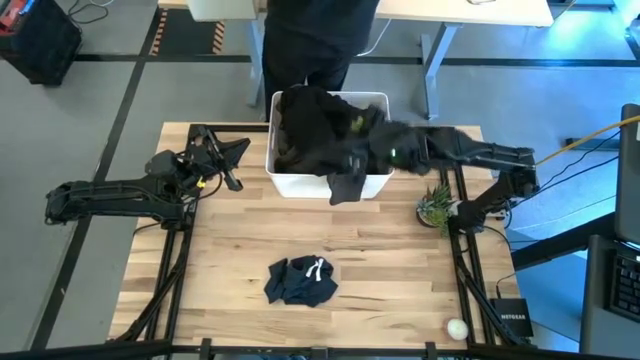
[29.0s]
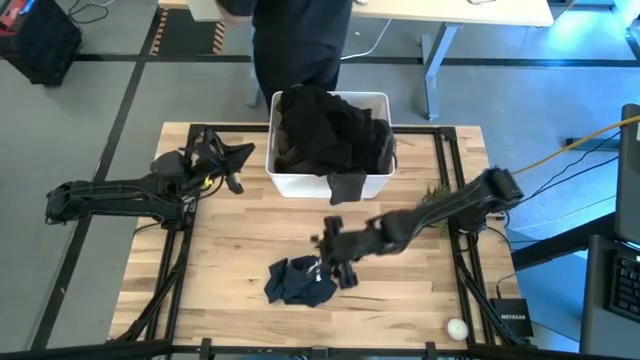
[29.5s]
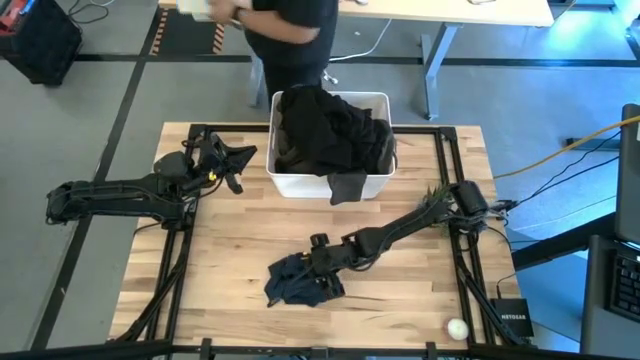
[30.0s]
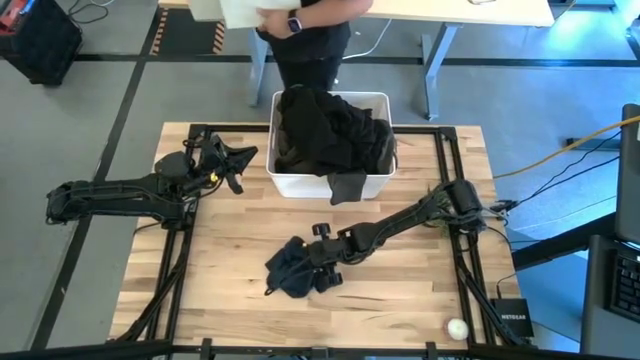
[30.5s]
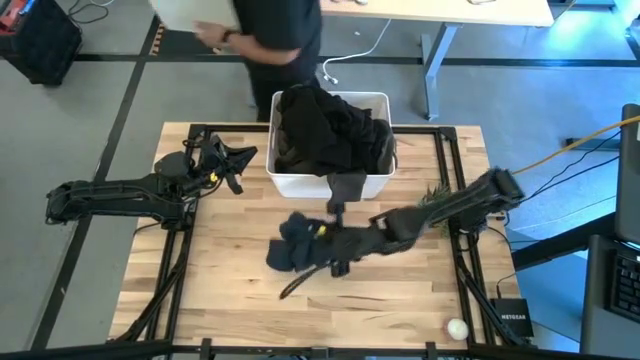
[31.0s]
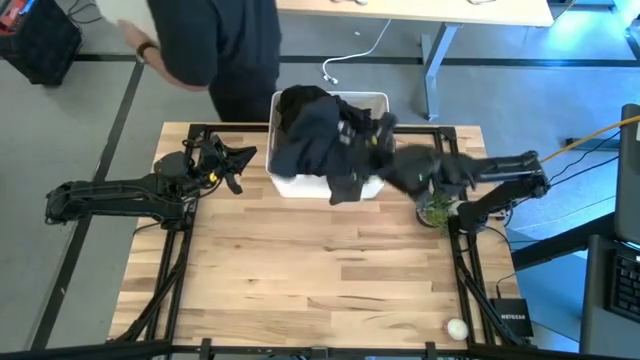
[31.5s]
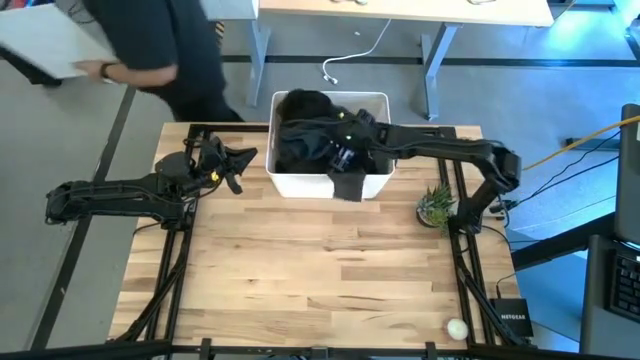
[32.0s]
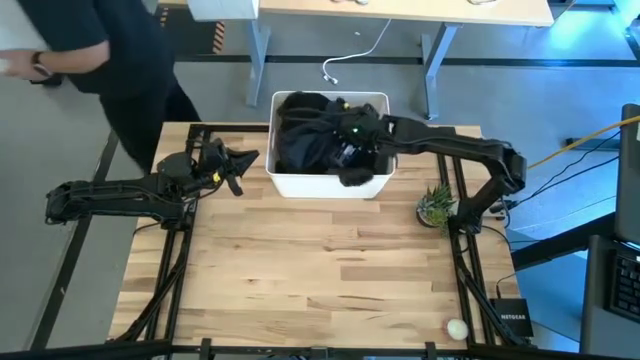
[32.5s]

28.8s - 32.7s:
Task: Sort clothes
Put the dark blue shorts into the bin

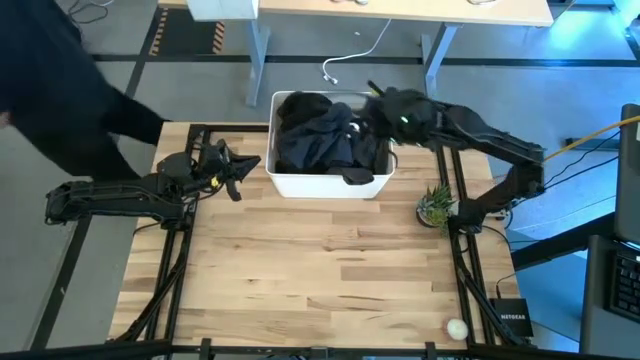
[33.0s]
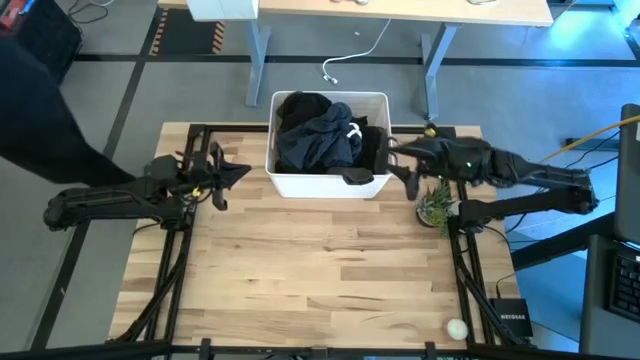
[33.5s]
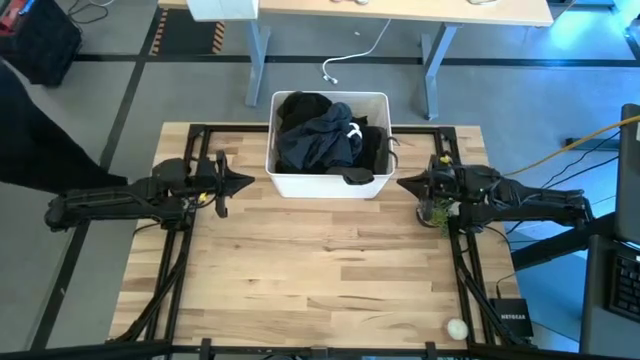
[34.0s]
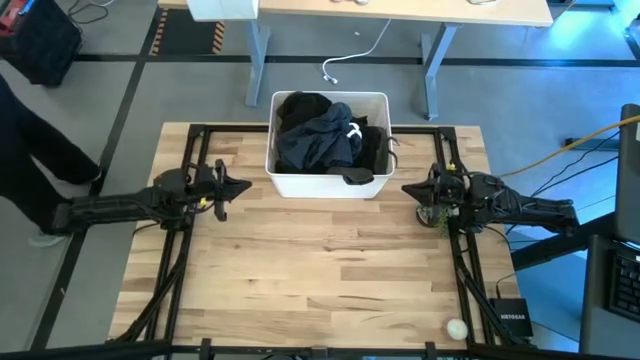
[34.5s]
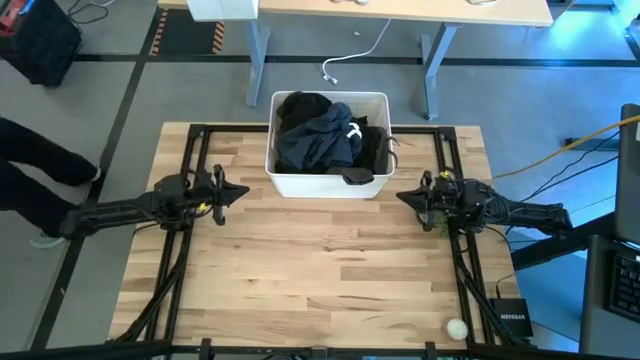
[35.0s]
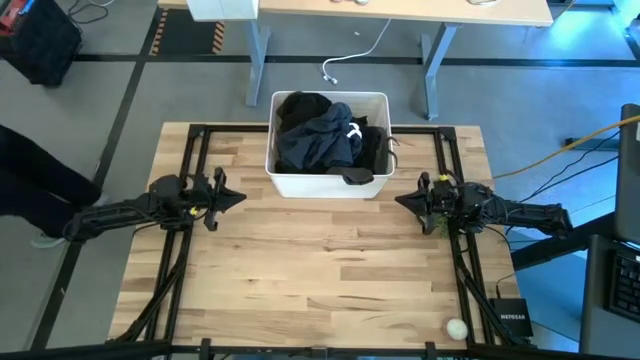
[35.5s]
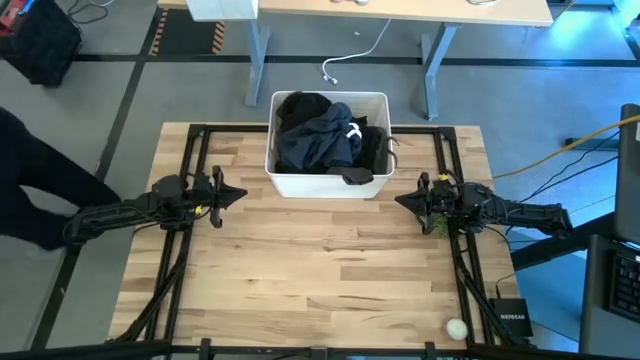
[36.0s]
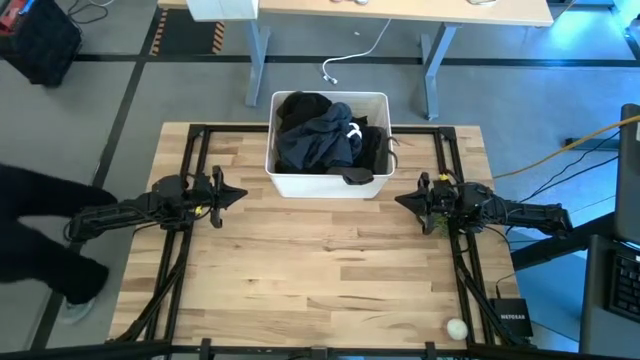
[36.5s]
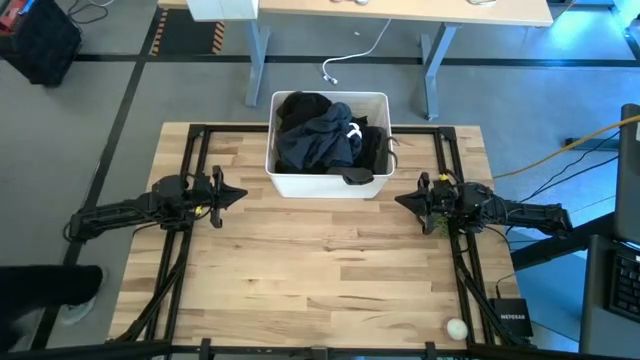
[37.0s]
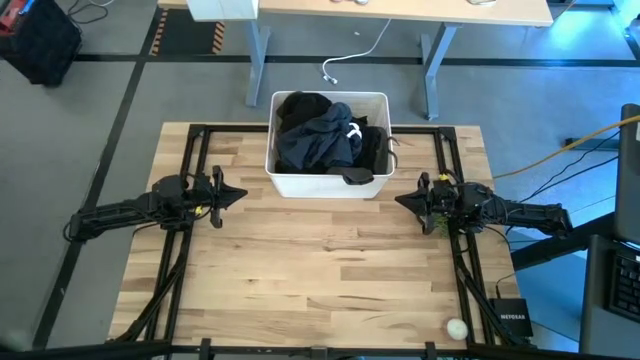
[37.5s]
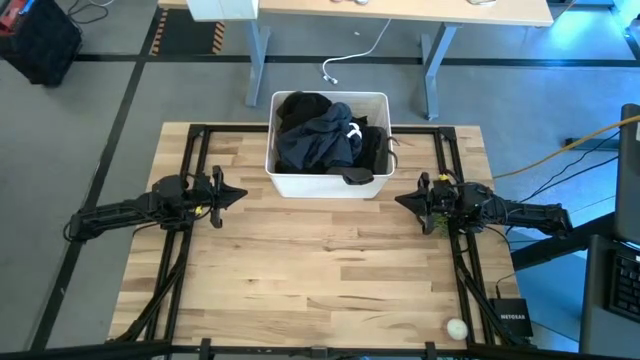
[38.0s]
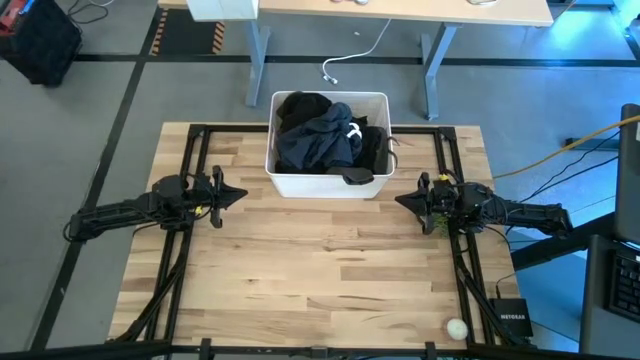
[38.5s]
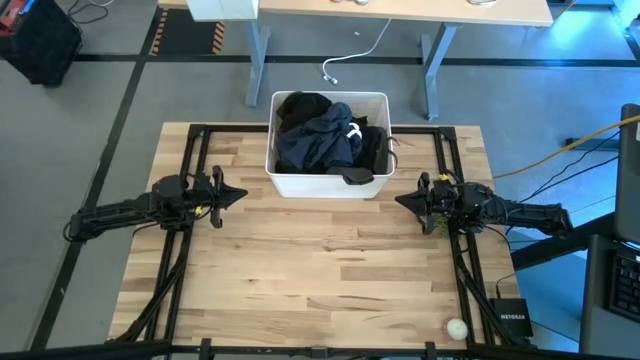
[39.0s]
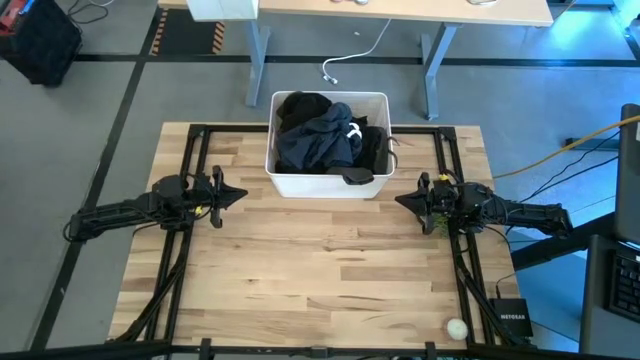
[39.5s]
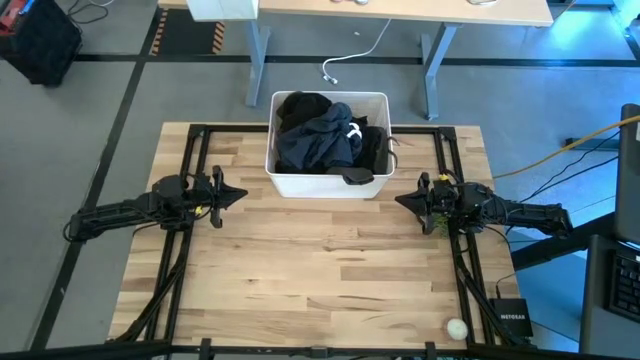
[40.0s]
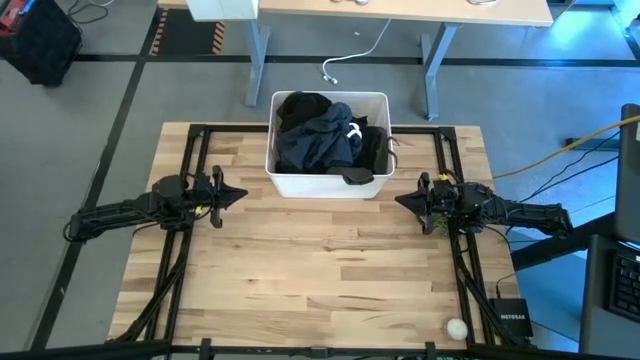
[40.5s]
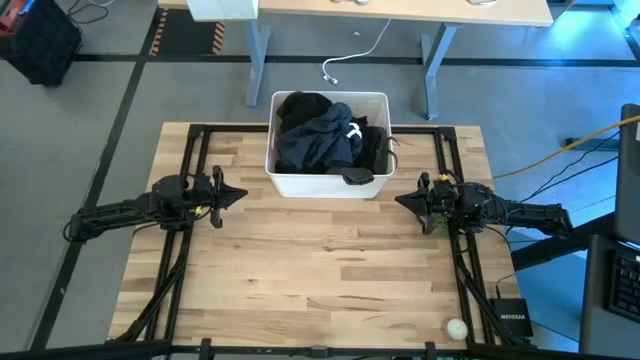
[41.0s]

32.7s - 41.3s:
Return to Home Position

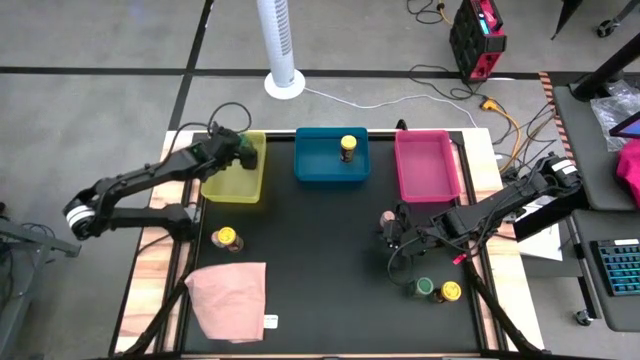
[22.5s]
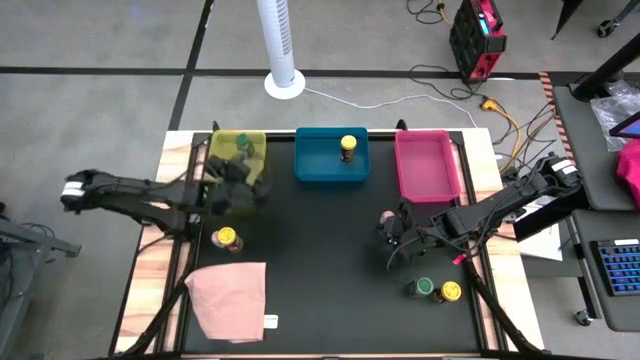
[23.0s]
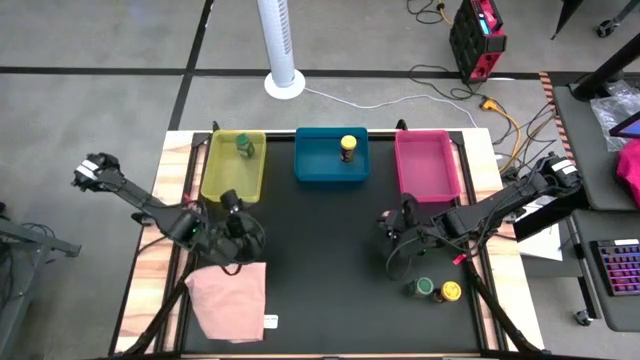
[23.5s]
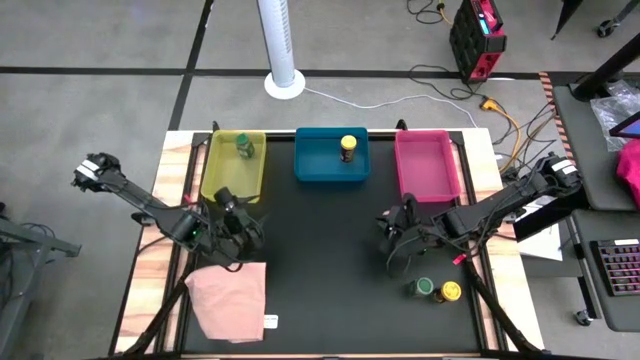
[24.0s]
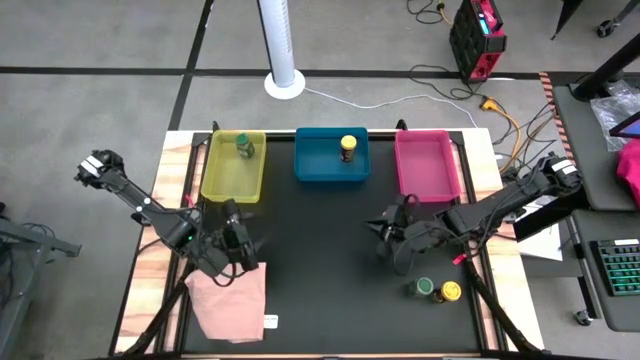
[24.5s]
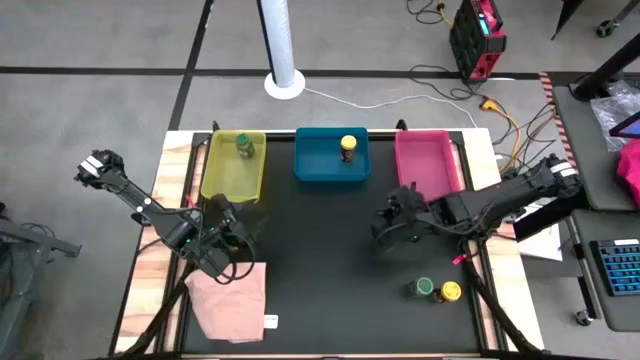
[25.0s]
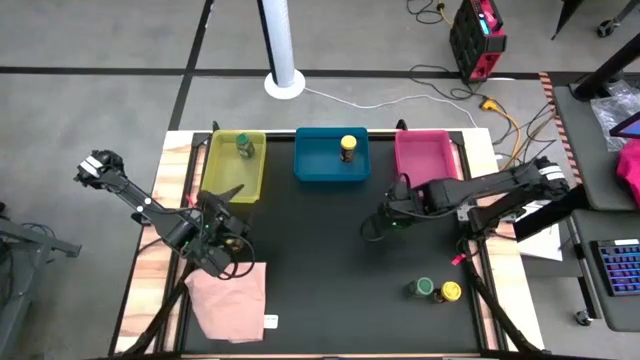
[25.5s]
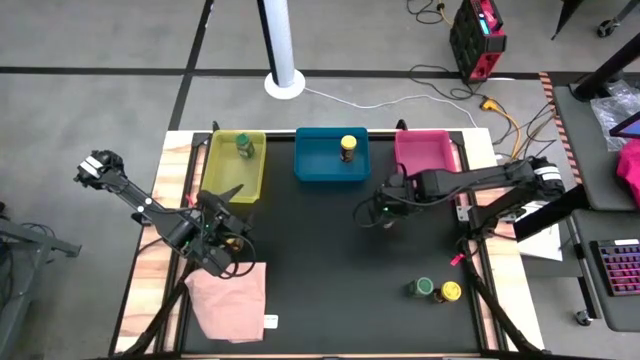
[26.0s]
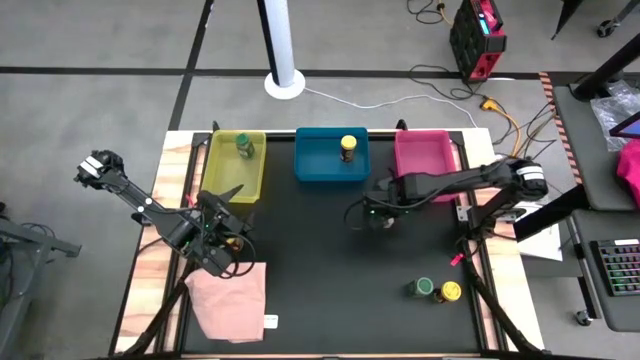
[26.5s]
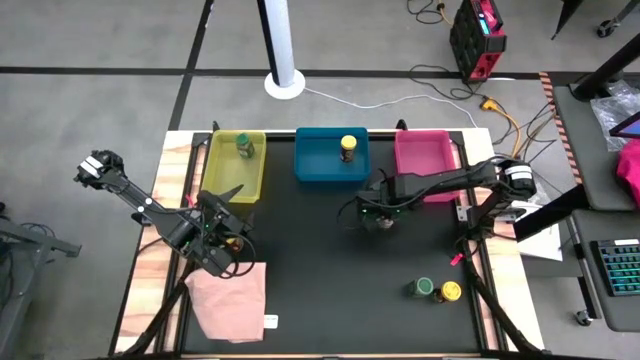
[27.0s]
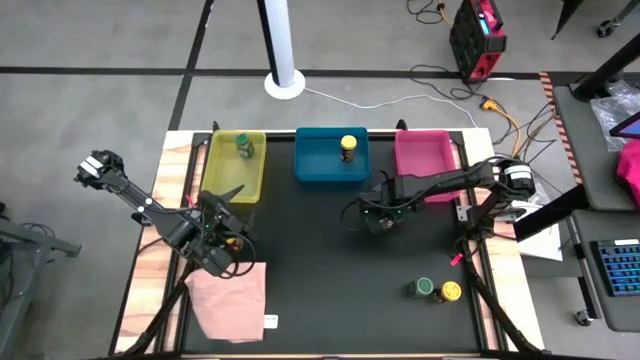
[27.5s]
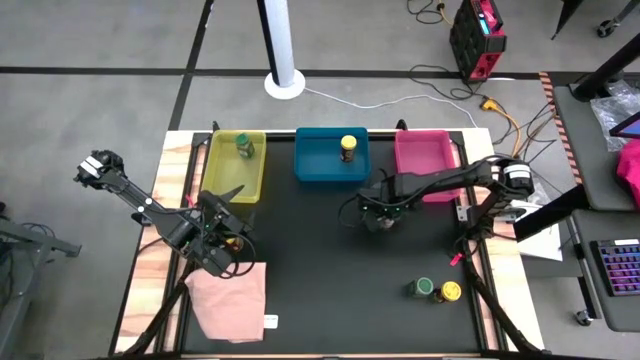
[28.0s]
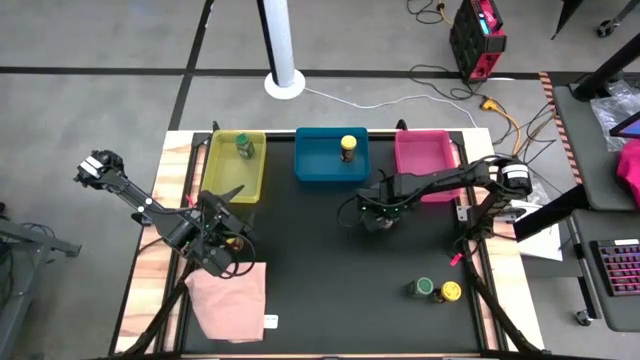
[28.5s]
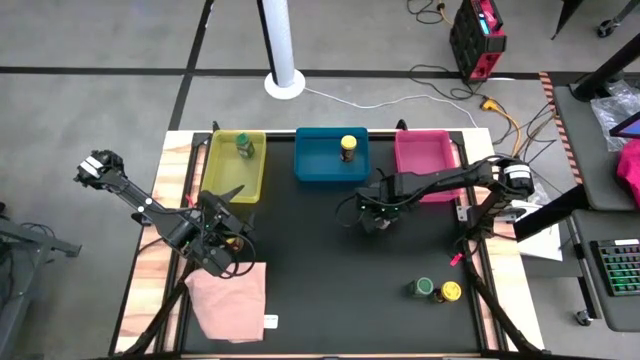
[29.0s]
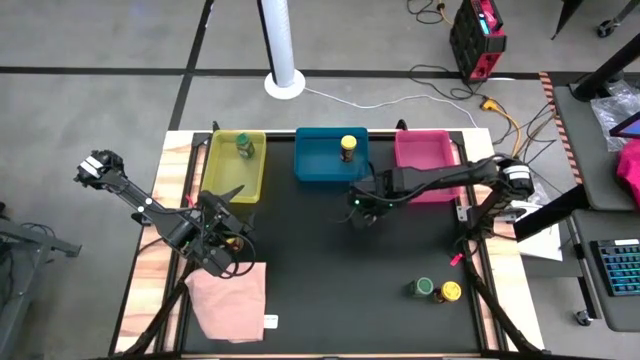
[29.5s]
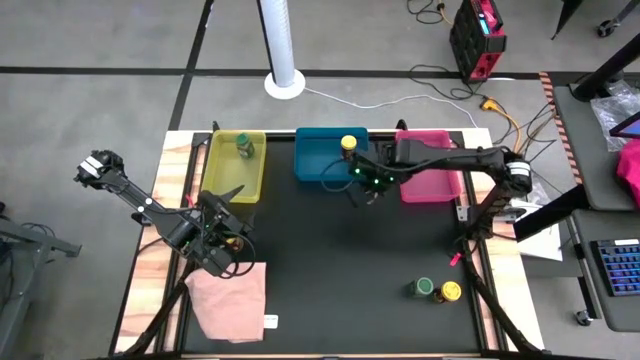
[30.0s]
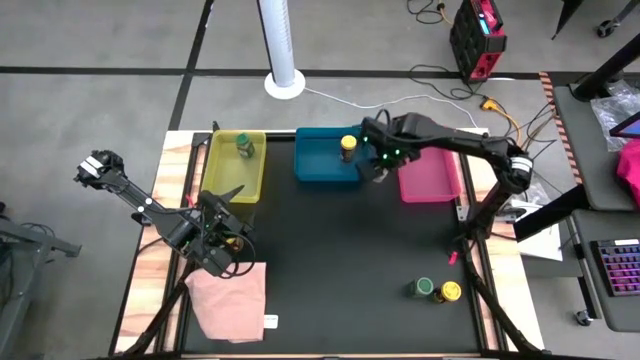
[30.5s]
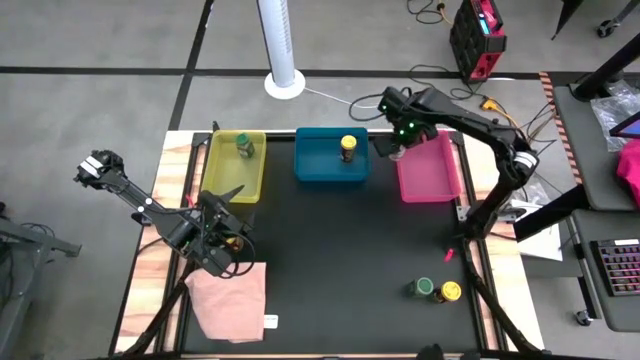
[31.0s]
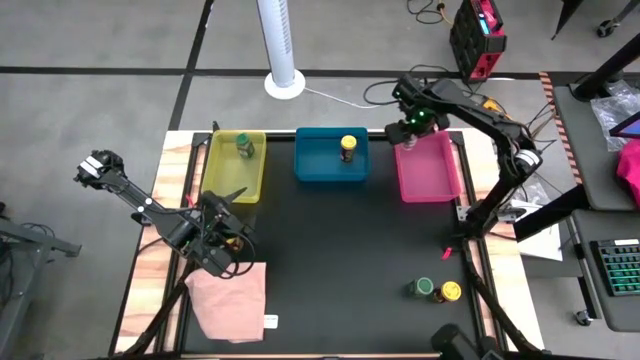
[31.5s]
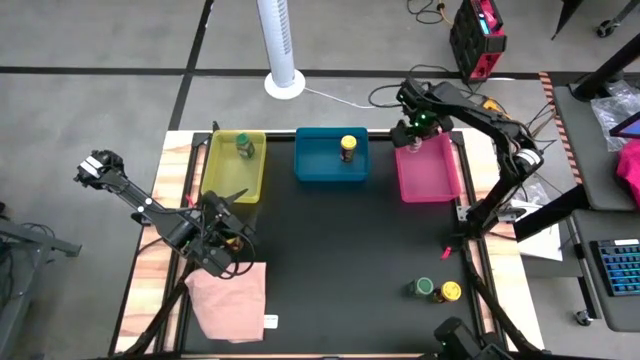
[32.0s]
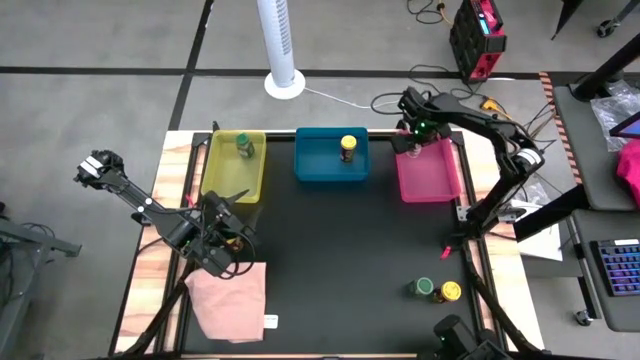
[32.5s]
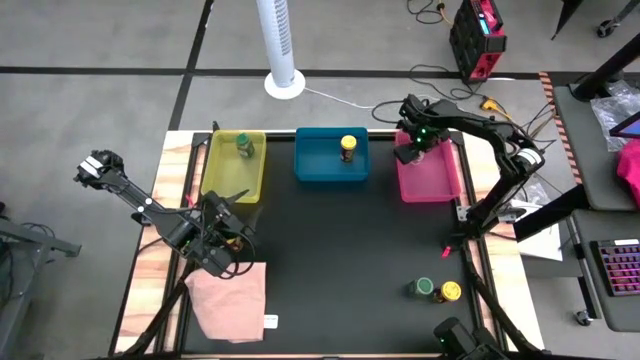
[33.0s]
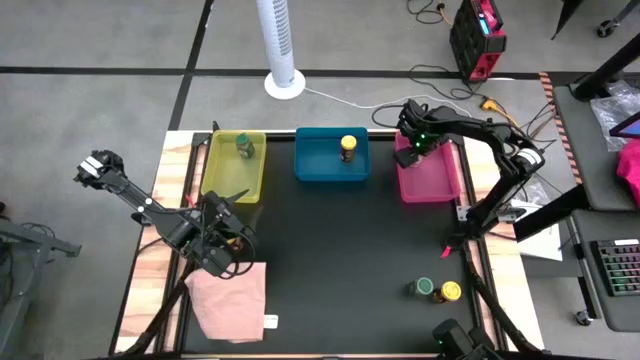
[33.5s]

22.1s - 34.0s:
Task: Sort spices by type
Put the right brown seasoning bottle into the pink bin
